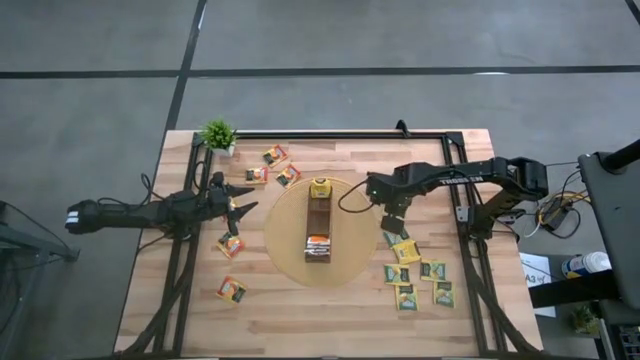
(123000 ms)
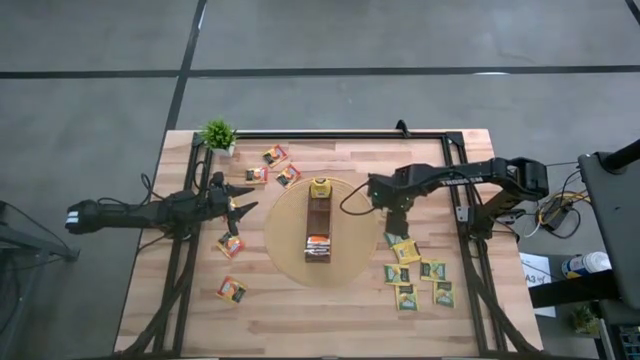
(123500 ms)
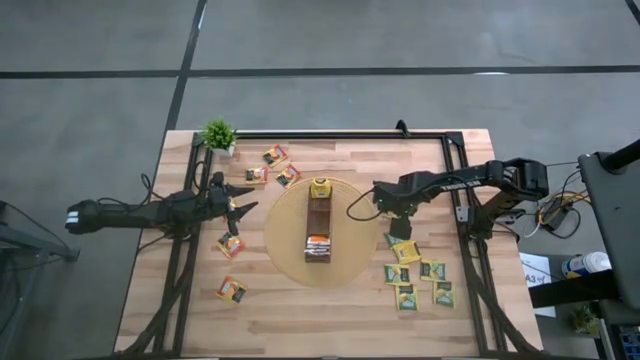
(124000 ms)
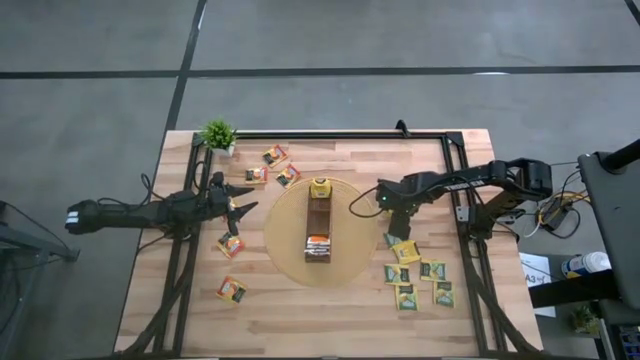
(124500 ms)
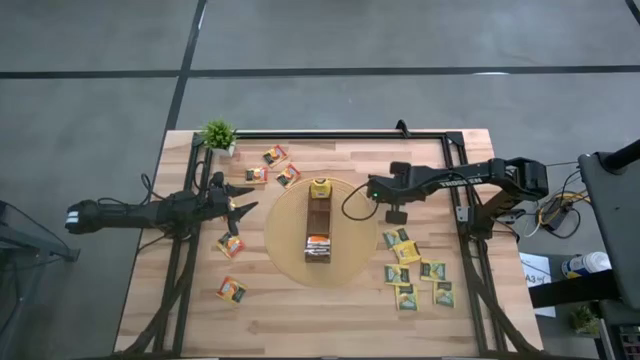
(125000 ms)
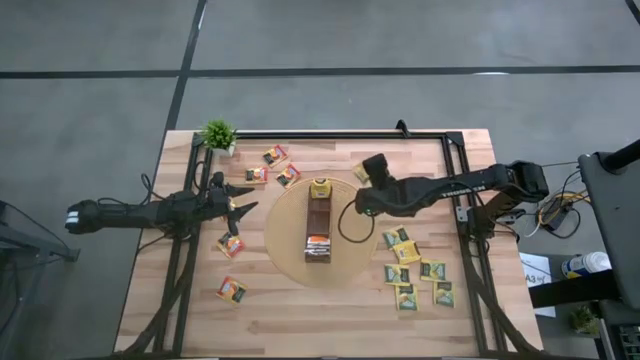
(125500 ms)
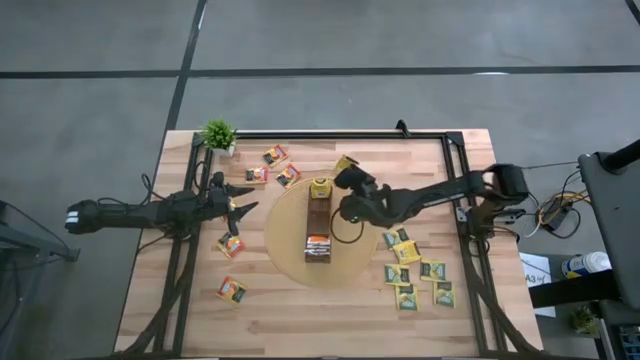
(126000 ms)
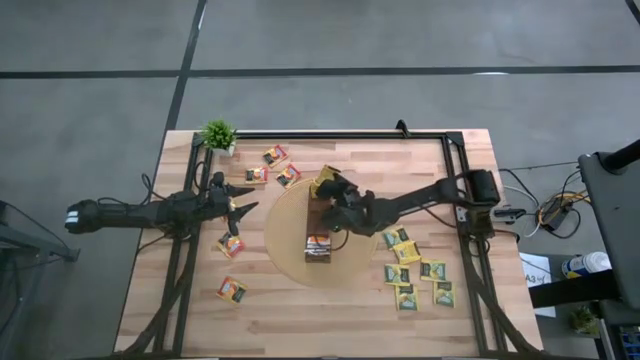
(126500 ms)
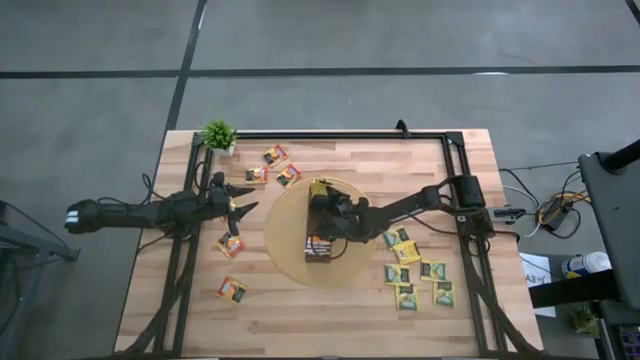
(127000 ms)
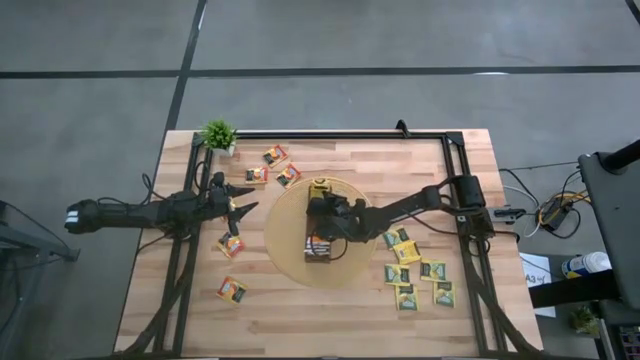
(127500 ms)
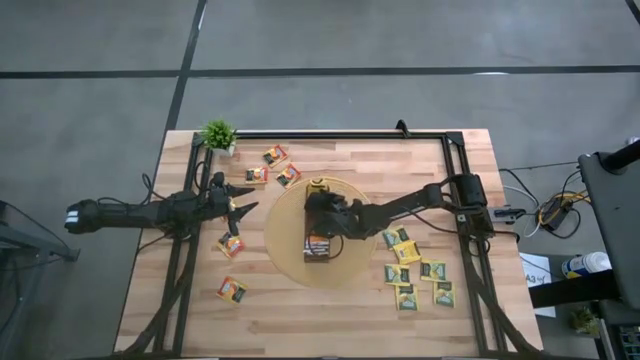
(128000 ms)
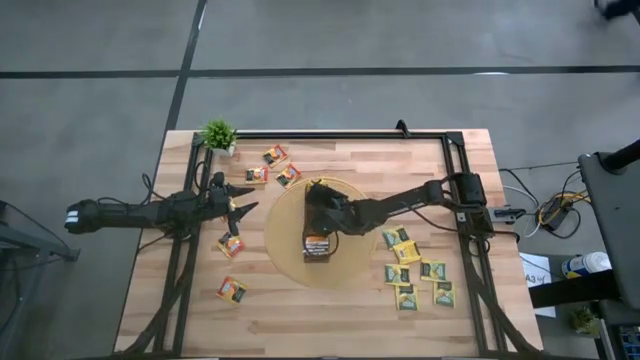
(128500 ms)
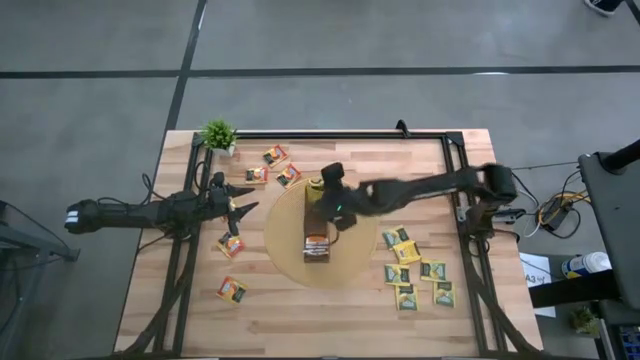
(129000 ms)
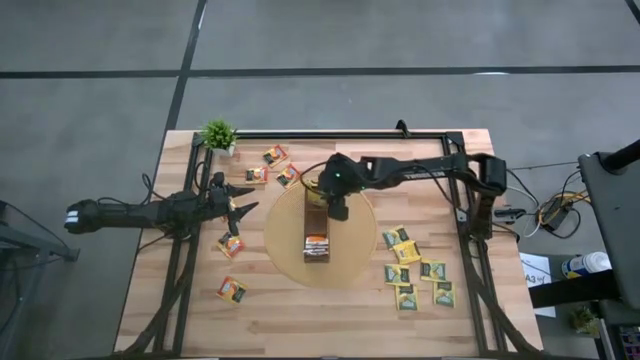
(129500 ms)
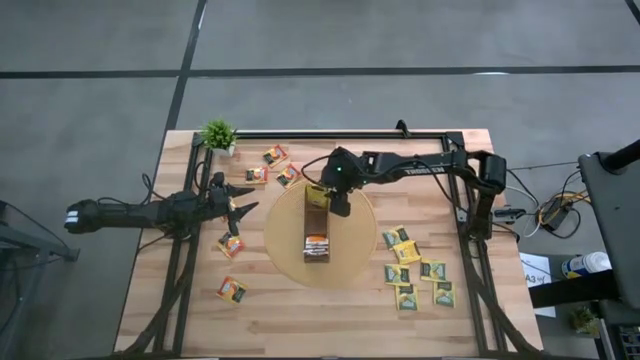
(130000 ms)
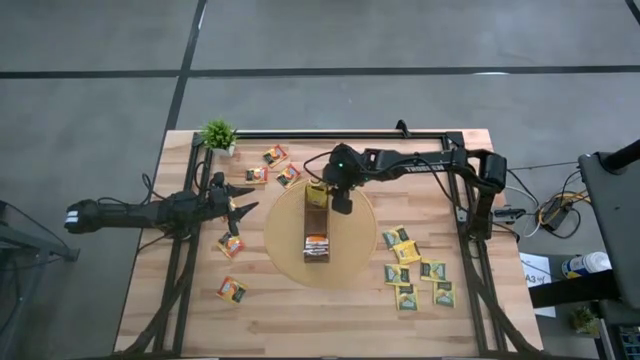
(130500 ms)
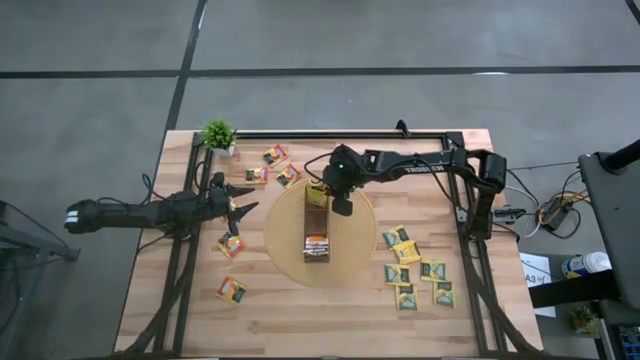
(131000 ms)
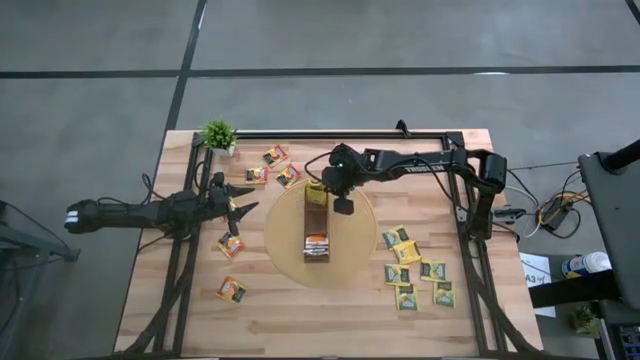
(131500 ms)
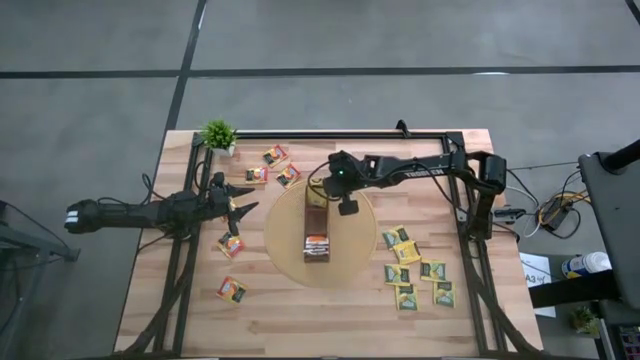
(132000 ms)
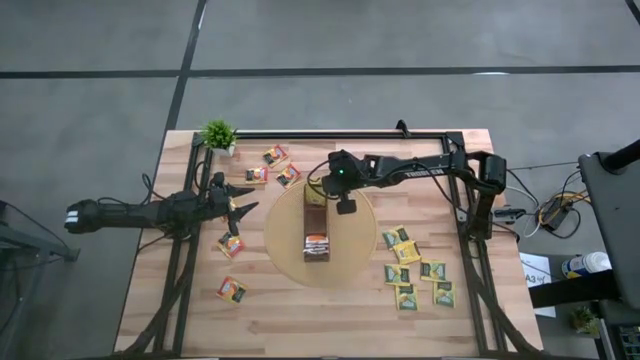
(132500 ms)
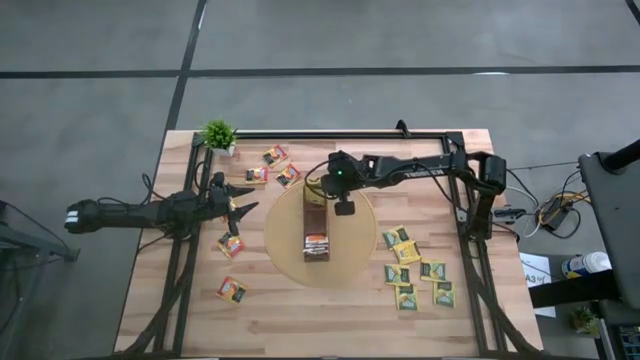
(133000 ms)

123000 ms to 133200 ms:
Task: Pick & Place Tea
Put the yellow tea bag into the top section of the wooden organizer

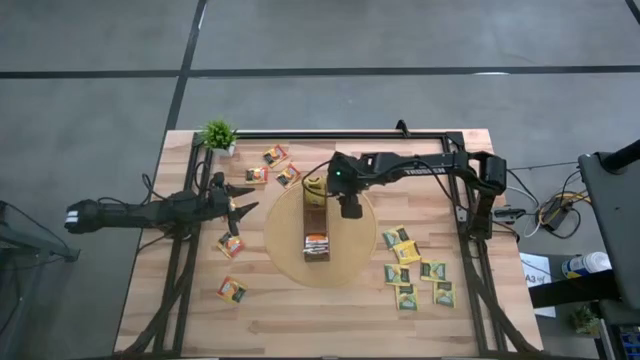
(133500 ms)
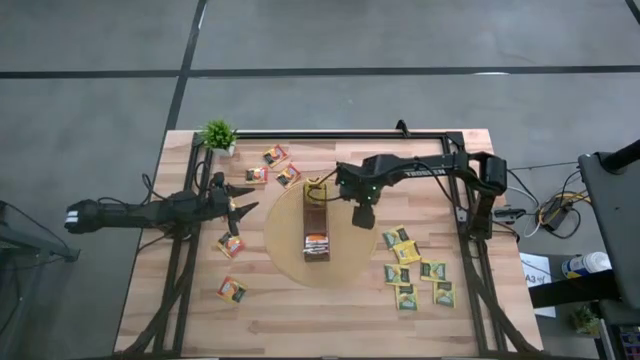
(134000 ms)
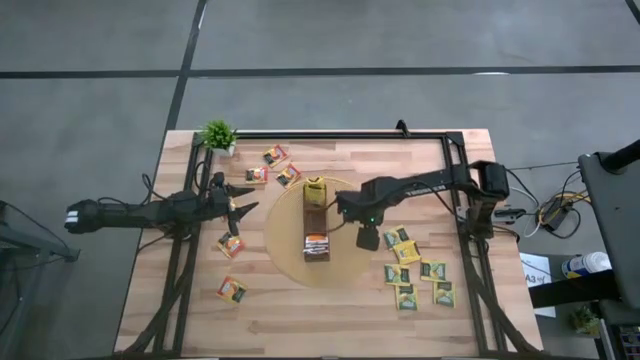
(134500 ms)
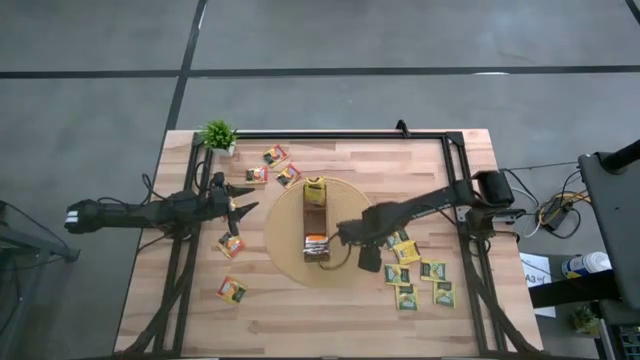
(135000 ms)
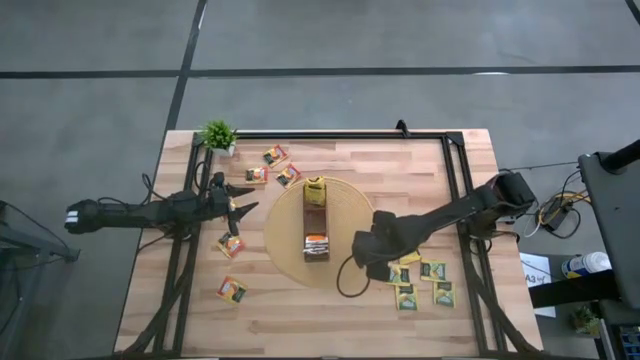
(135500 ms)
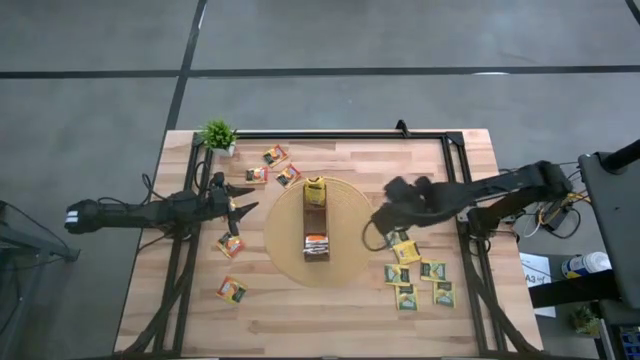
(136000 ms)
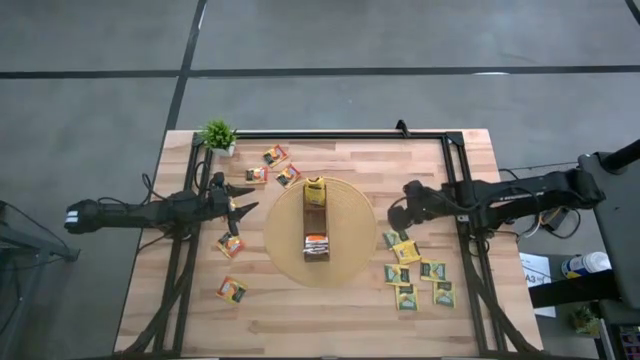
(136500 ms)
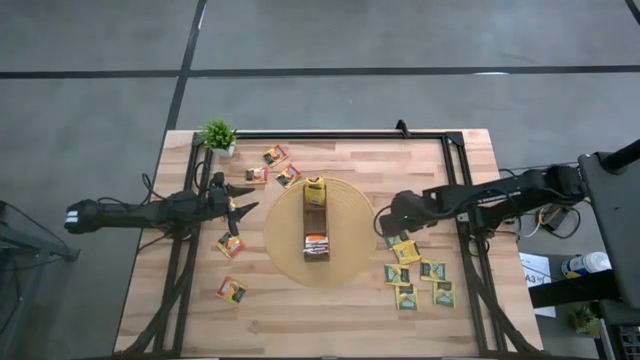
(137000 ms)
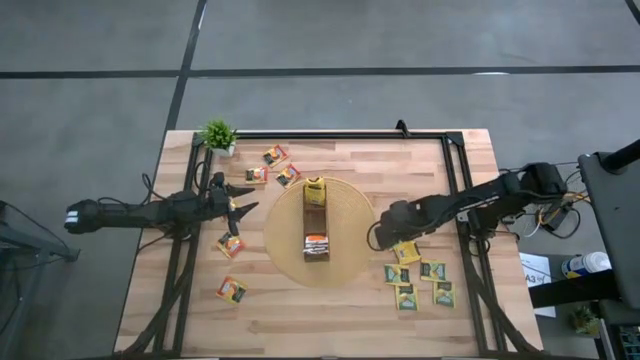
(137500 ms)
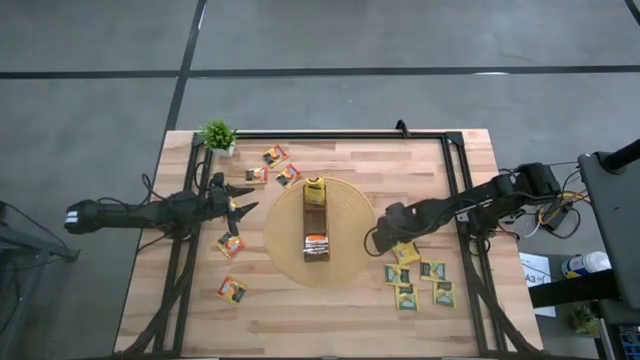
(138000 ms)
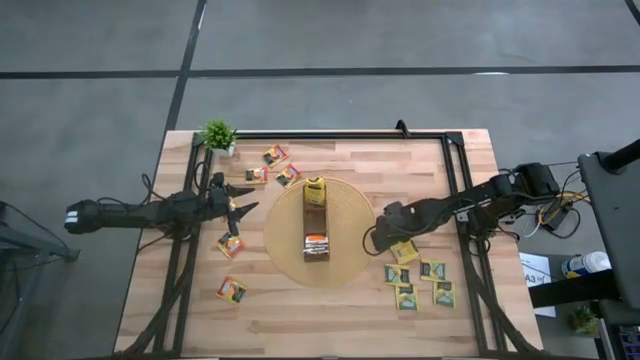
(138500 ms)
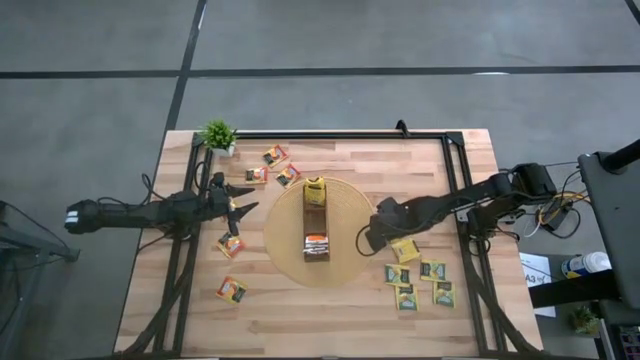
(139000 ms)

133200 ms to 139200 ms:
Put the yellow tea bag into the top section of the wooden organizer

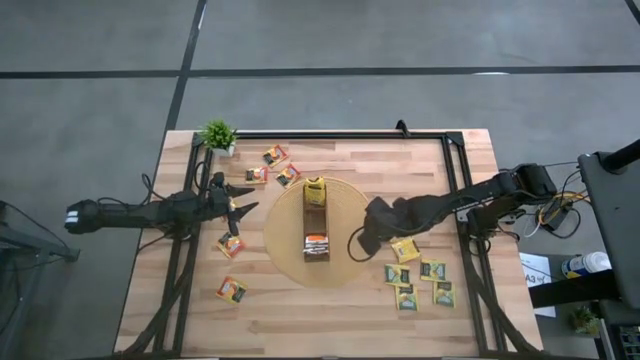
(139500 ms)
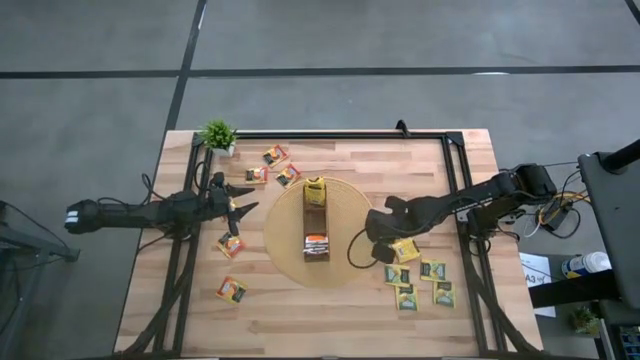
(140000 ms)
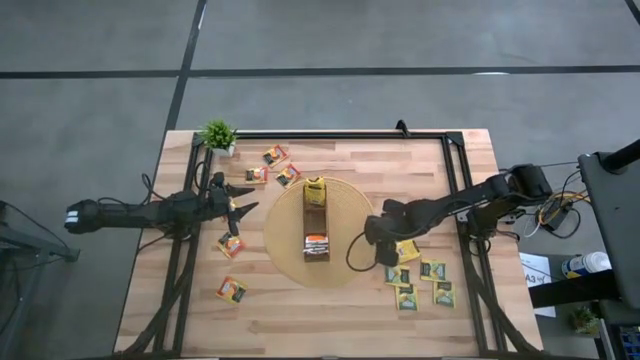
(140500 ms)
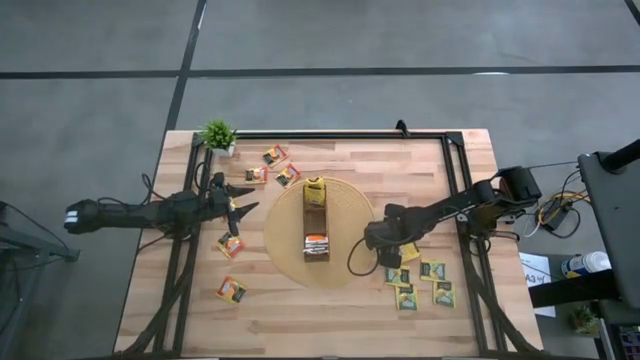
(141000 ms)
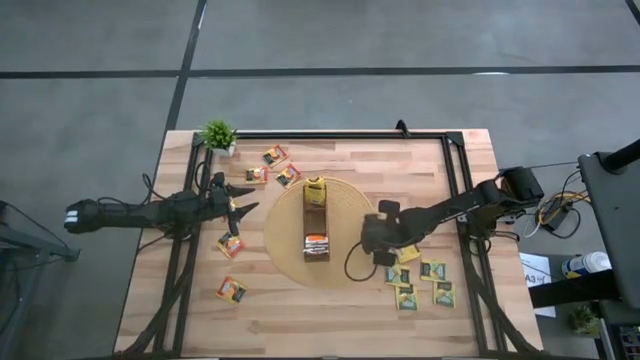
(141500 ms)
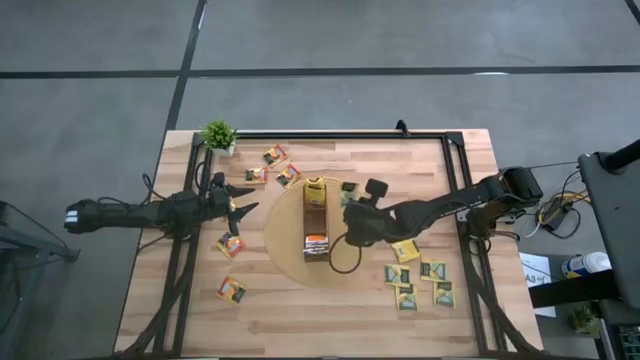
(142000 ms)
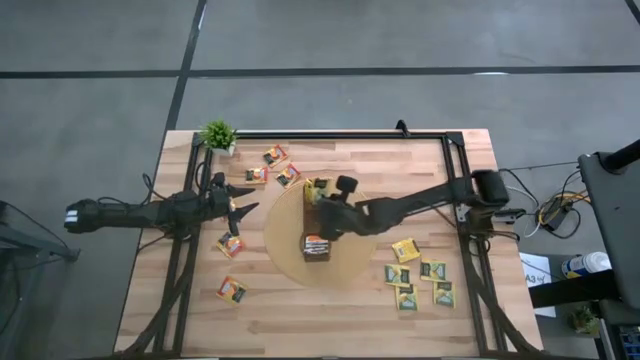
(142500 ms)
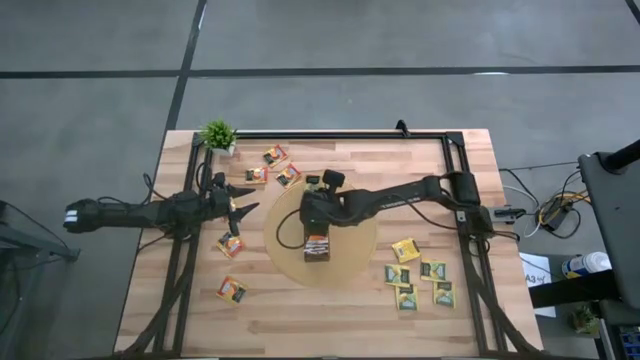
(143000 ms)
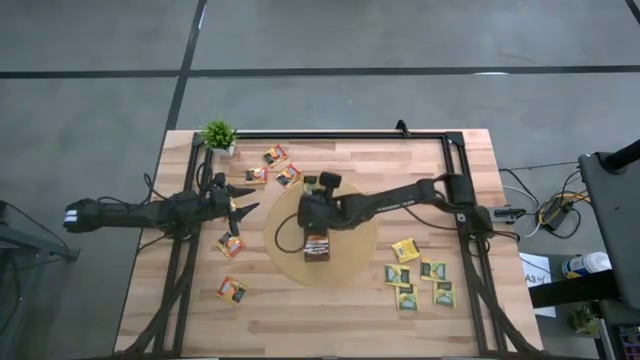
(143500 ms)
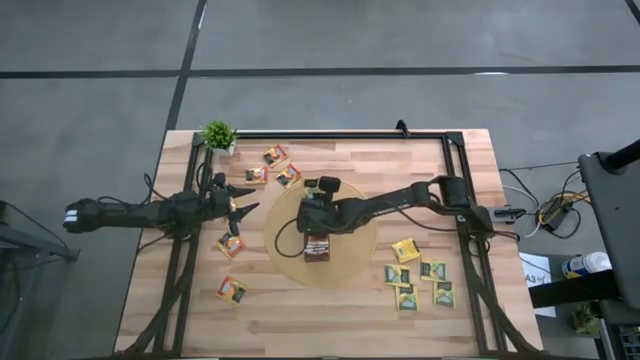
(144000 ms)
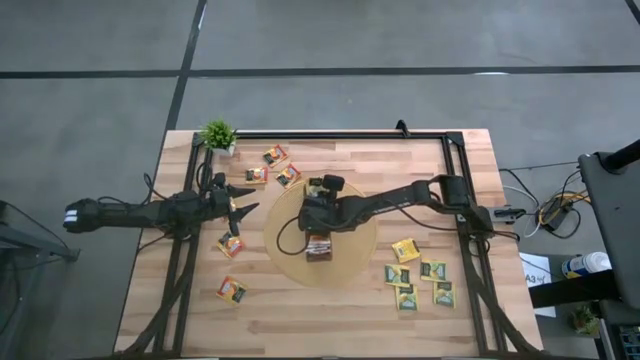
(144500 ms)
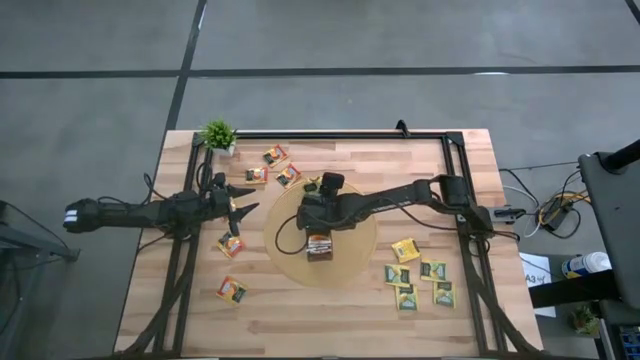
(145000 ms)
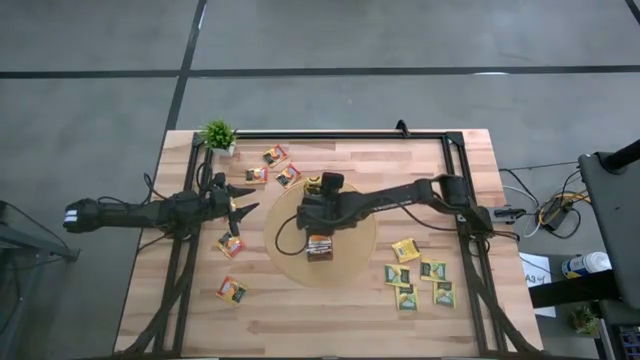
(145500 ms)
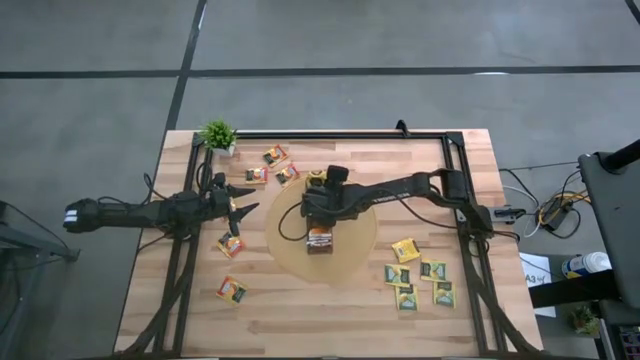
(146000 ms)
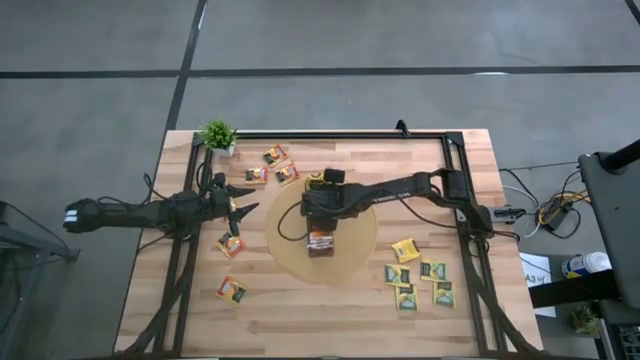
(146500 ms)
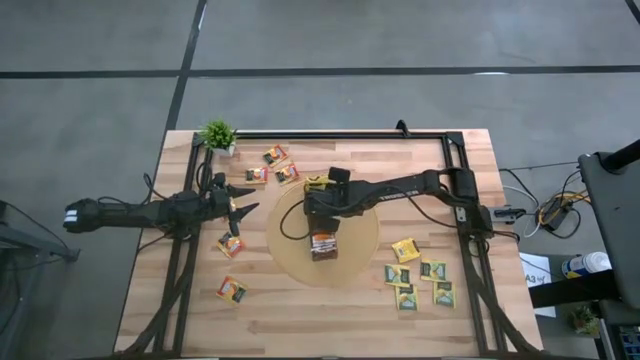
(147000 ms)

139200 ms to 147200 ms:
Put the yellow tea bag into the top section of the wooden organizer
